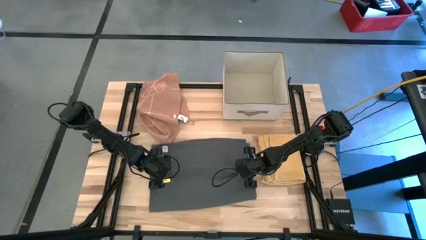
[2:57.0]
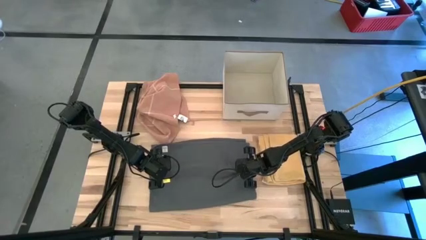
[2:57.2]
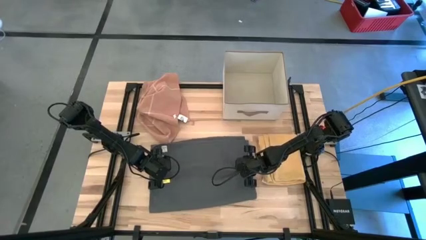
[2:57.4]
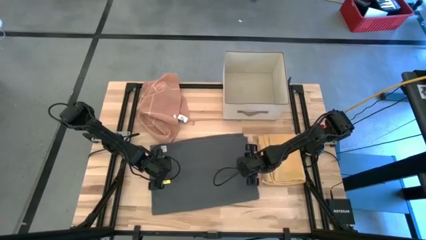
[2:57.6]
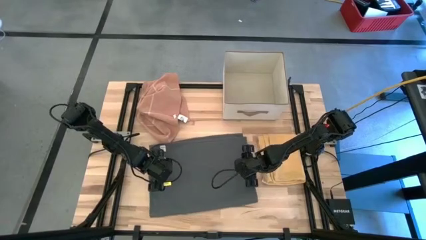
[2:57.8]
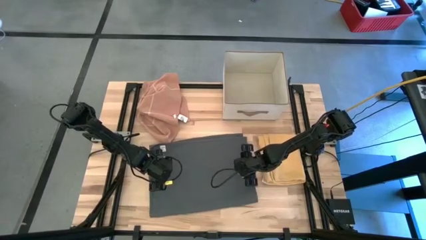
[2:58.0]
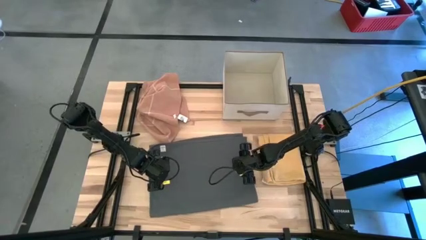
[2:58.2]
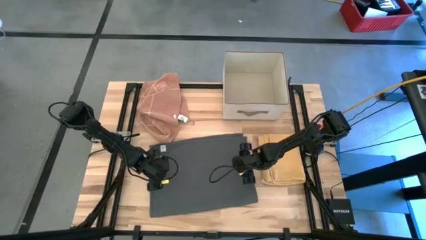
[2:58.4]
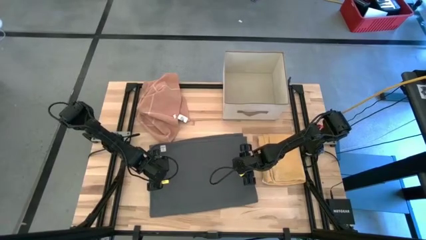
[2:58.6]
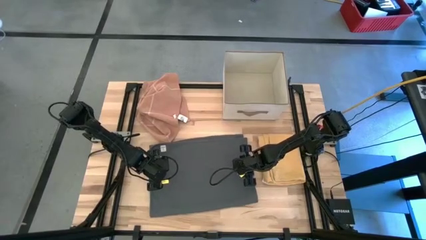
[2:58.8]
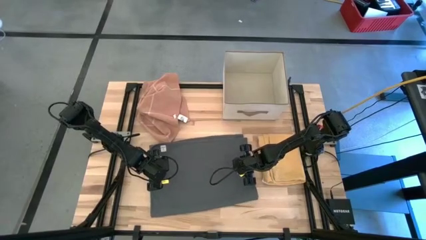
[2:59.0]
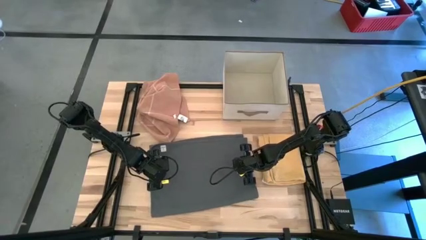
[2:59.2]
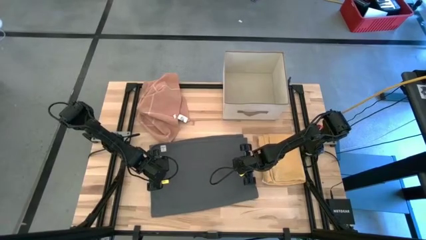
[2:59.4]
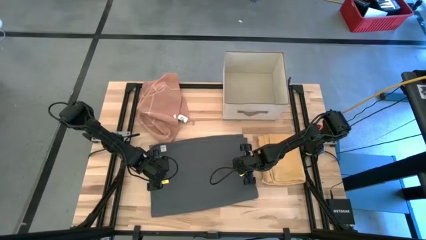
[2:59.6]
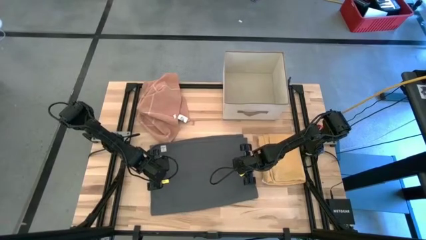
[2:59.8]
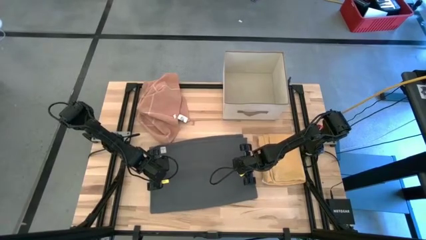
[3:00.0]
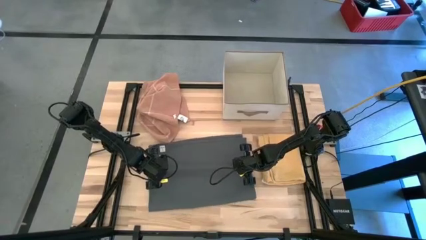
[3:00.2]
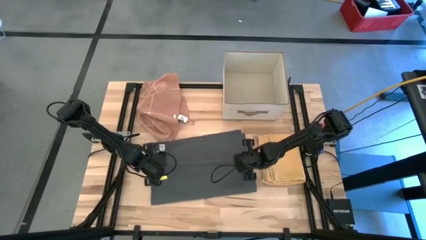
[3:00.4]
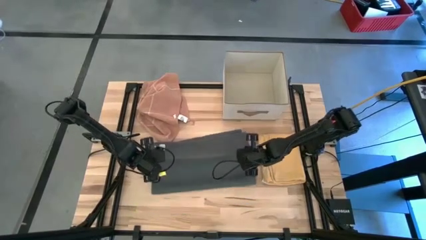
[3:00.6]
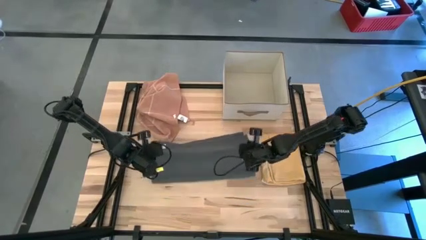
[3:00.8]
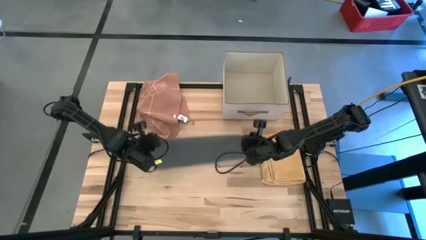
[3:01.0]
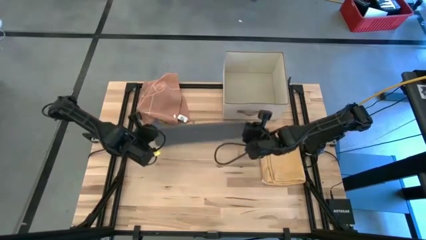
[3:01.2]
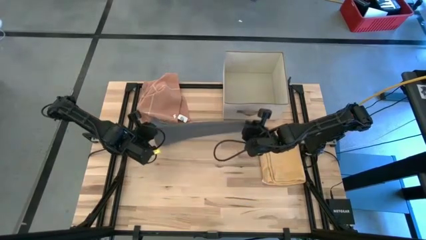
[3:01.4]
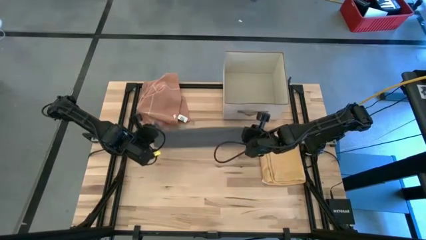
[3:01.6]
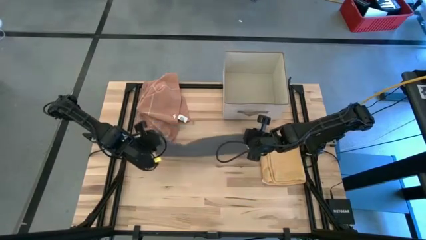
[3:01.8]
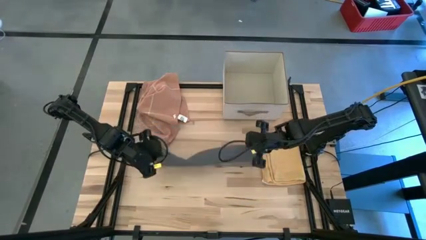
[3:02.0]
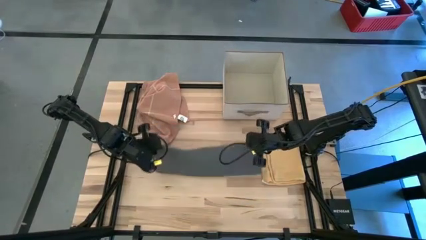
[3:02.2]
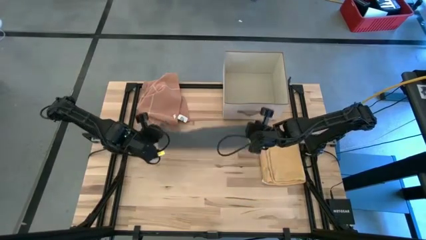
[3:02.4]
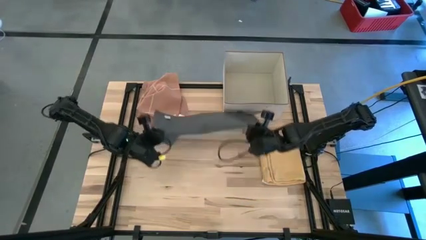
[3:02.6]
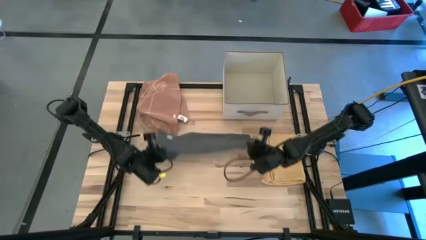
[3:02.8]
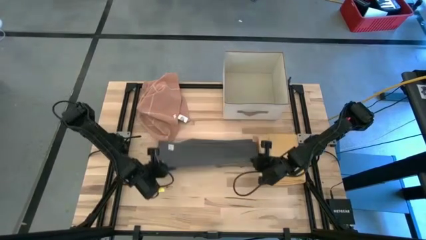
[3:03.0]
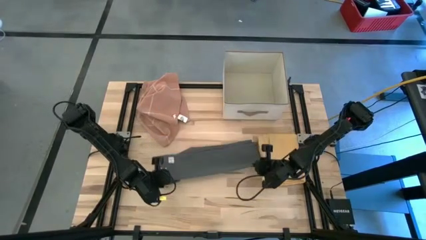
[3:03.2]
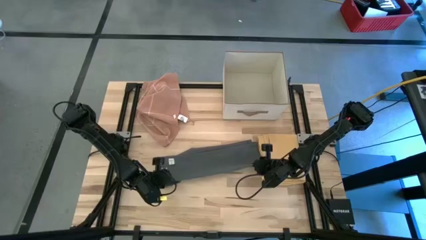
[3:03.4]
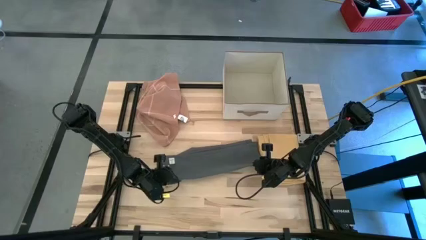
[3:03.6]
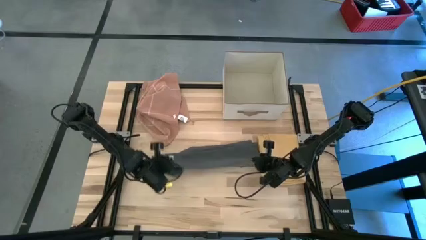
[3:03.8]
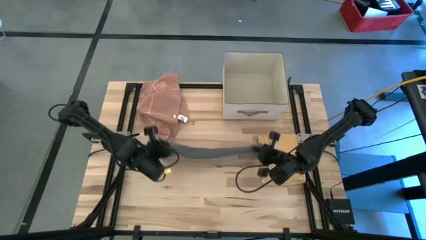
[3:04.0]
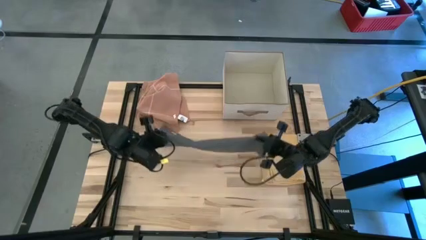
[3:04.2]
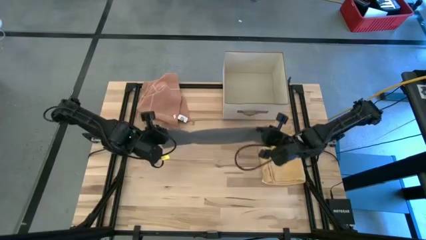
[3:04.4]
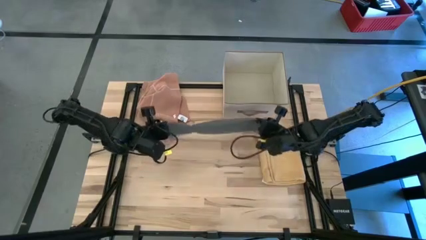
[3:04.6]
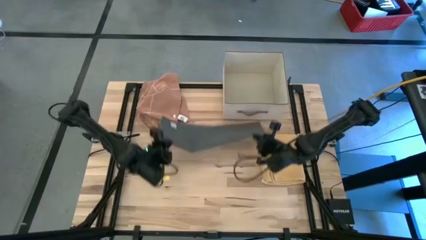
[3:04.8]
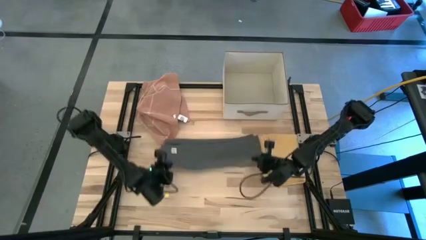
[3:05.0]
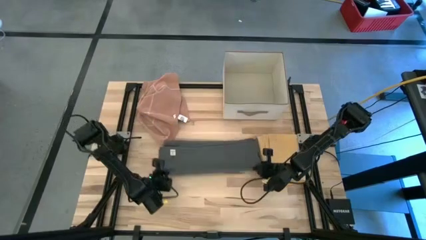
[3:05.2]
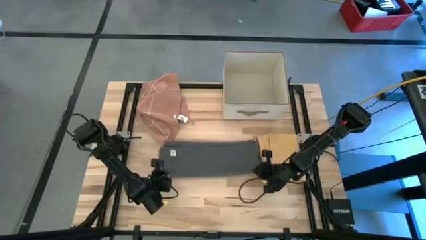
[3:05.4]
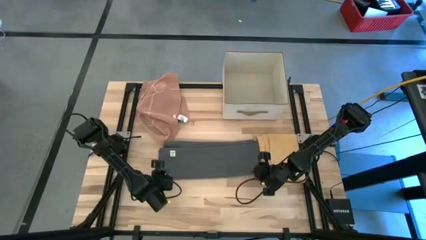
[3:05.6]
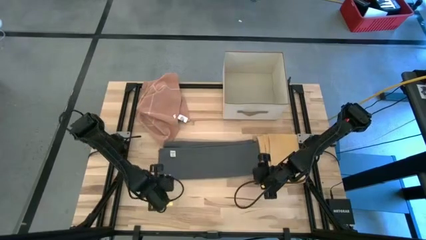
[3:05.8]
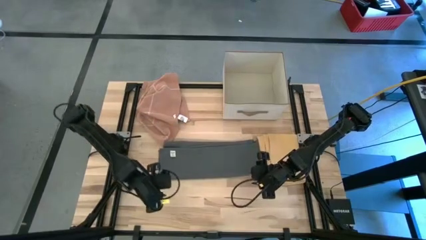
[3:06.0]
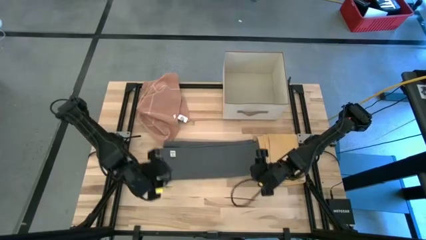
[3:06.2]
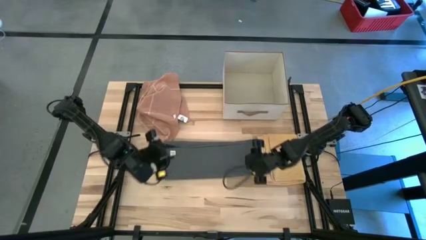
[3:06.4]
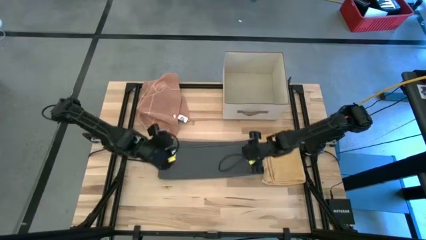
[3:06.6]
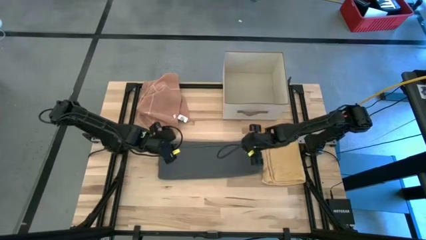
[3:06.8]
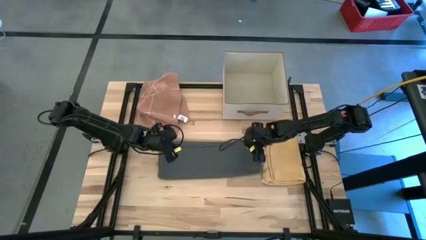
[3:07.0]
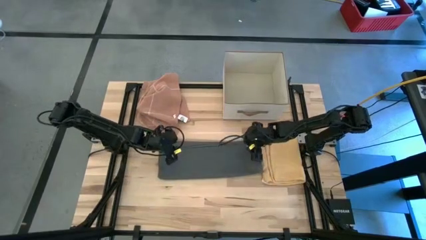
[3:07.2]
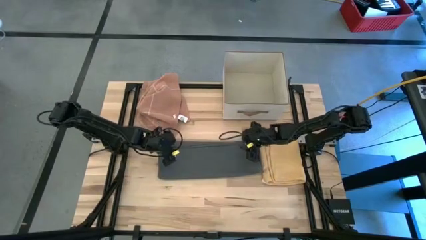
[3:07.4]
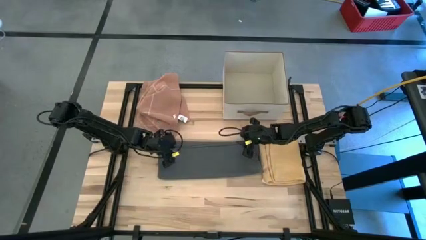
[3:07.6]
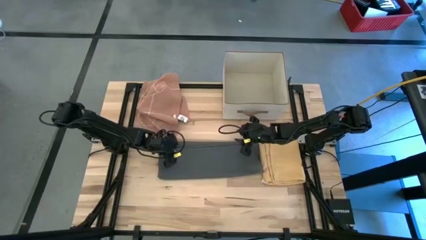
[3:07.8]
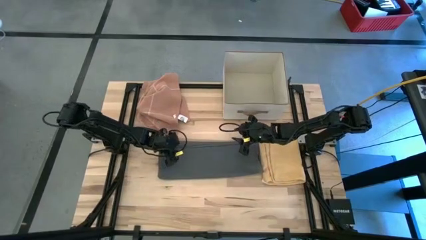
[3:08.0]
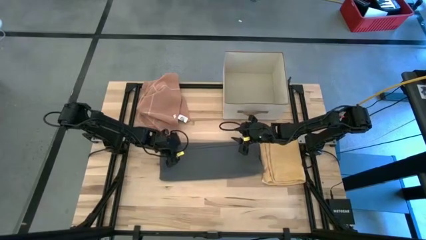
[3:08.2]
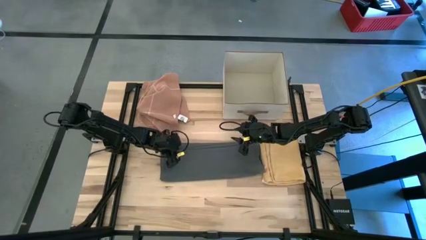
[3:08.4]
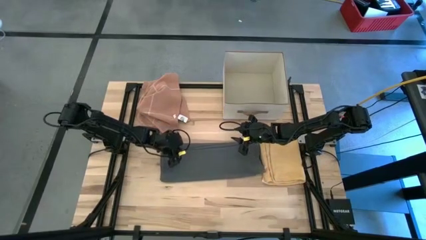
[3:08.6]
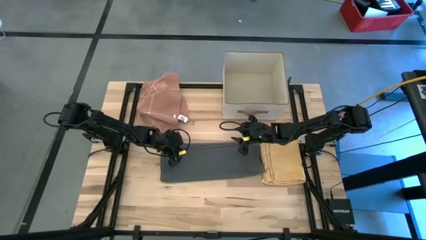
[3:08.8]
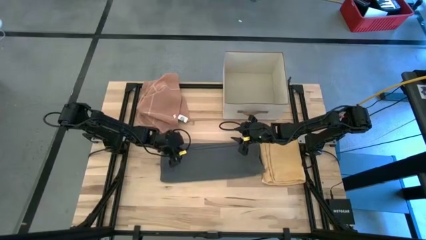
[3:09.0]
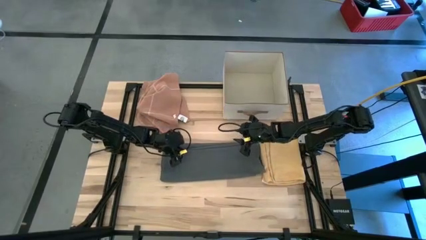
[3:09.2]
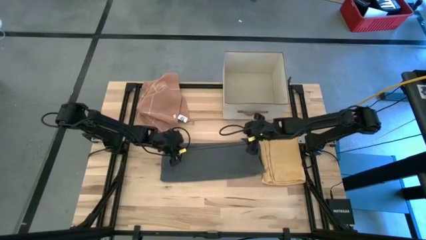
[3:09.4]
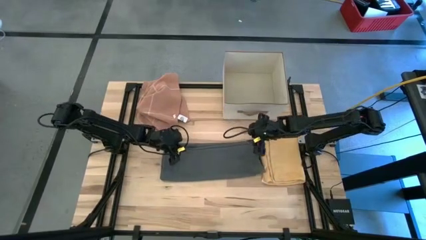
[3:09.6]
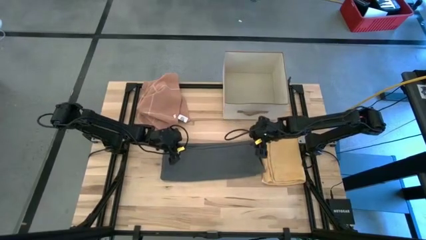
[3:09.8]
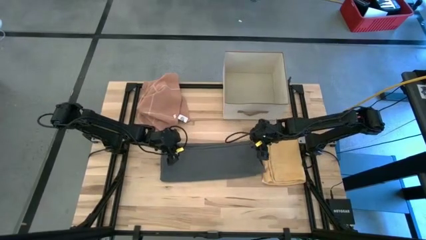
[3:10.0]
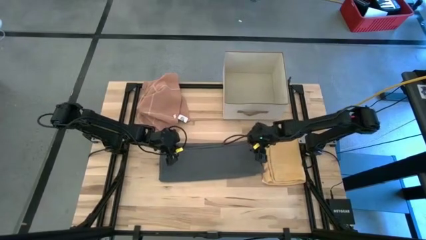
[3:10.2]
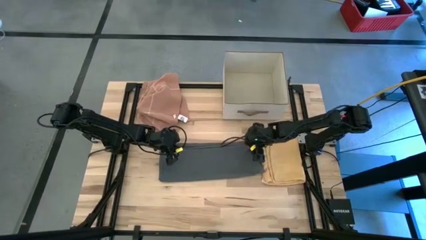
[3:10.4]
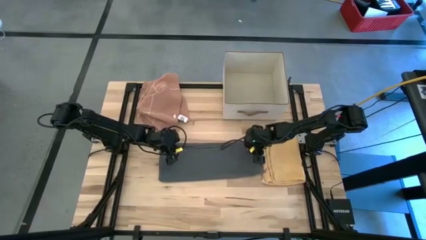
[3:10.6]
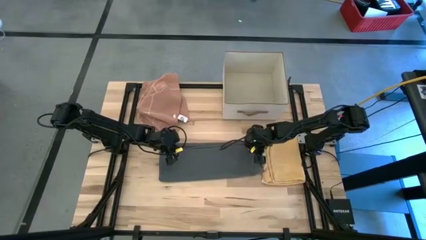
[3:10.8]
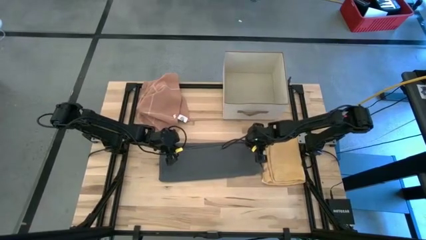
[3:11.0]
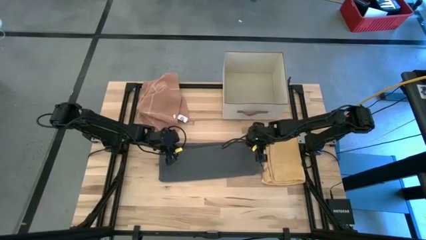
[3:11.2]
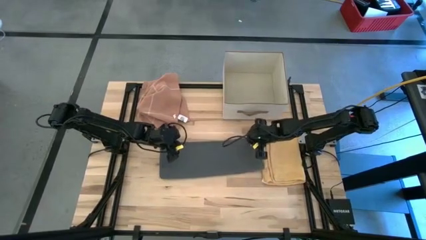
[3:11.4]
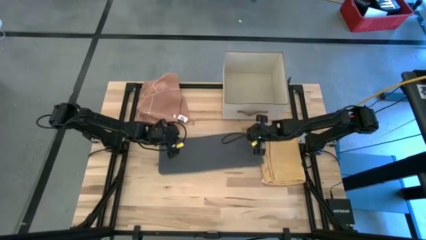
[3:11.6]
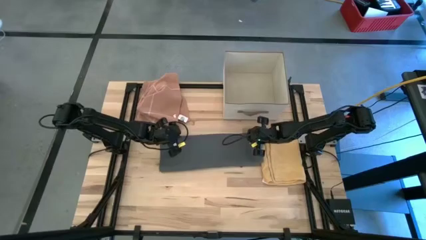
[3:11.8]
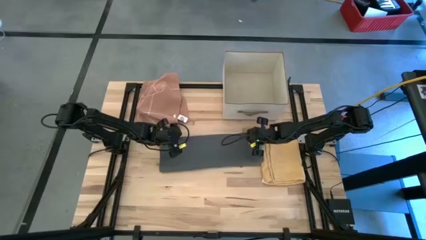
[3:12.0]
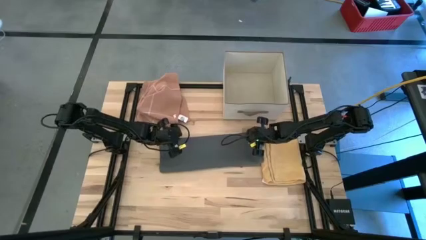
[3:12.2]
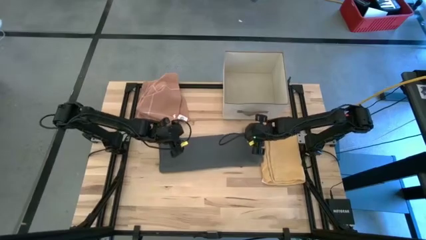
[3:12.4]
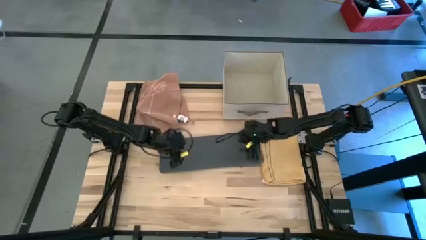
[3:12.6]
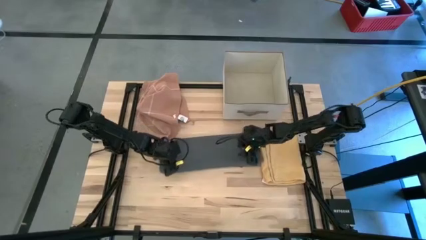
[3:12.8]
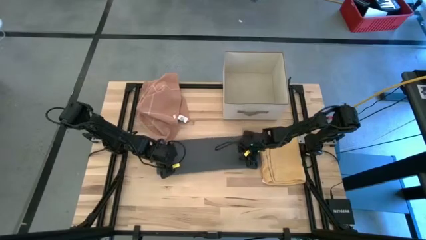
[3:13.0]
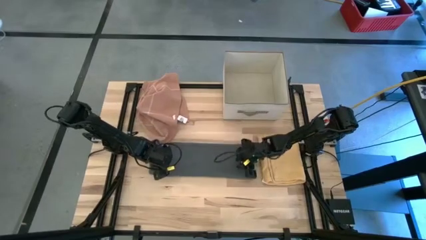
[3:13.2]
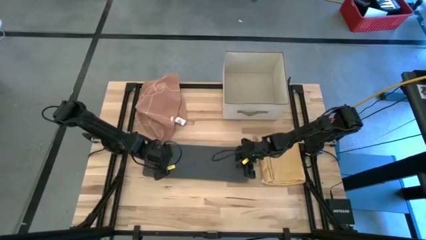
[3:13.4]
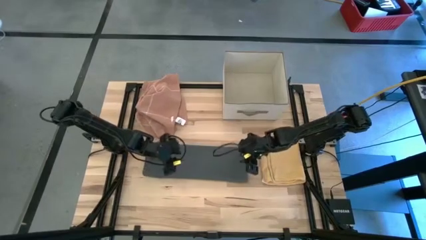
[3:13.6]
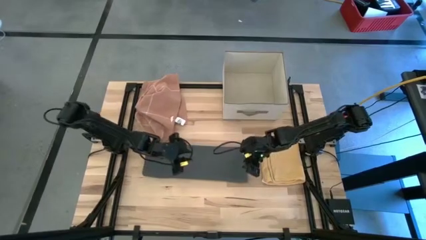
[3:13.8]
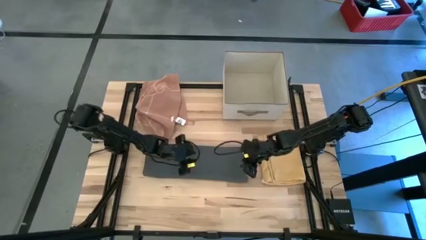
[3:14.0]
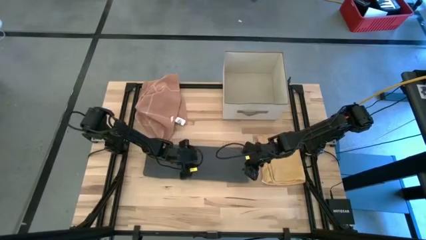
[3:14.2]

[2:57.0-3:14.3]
Task: Fold towel
Fold the gray towel
